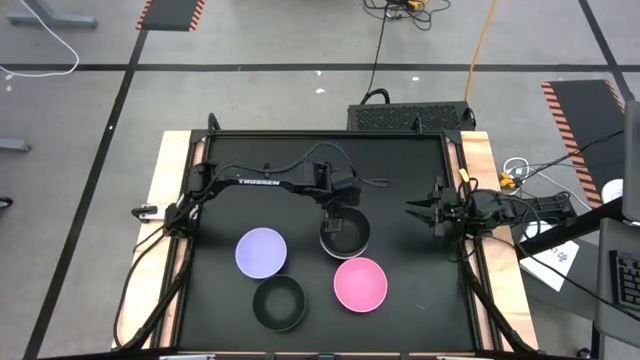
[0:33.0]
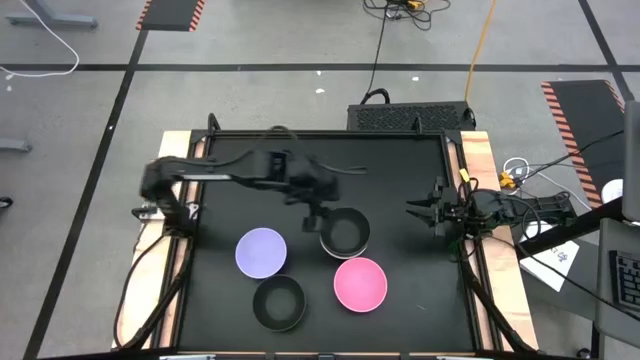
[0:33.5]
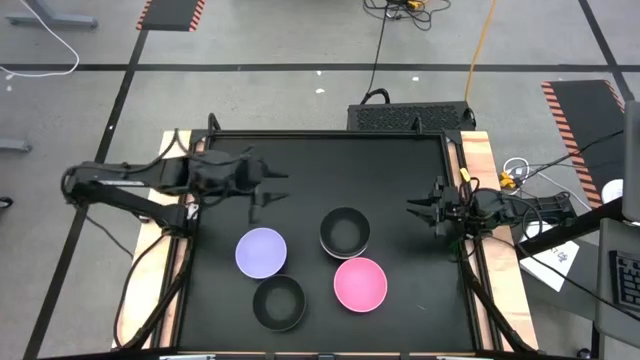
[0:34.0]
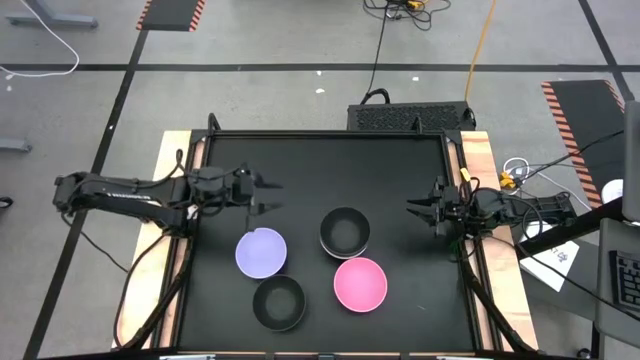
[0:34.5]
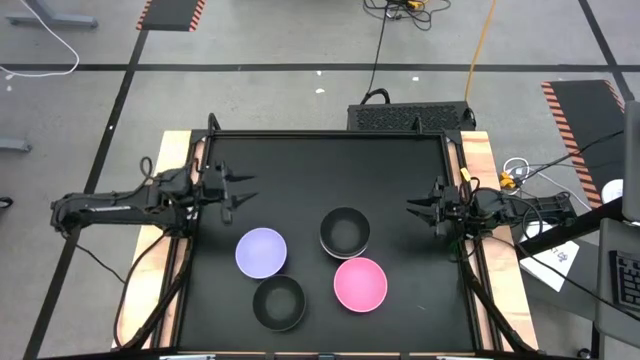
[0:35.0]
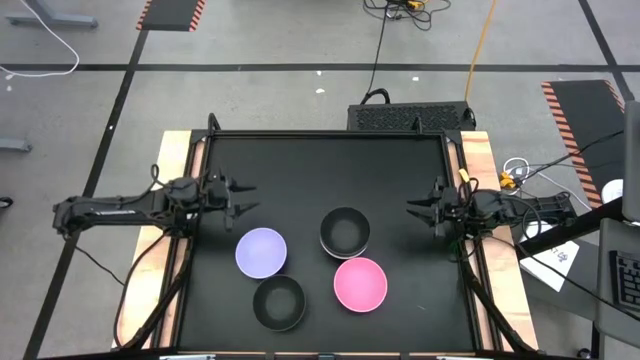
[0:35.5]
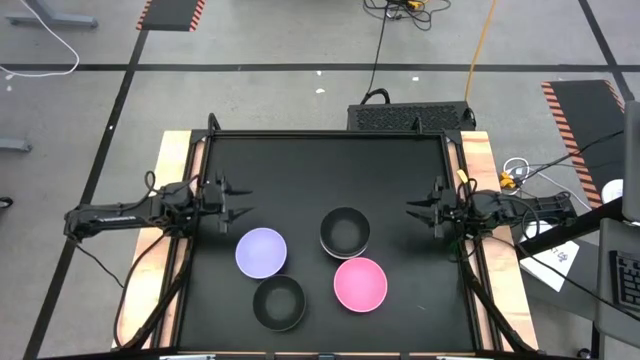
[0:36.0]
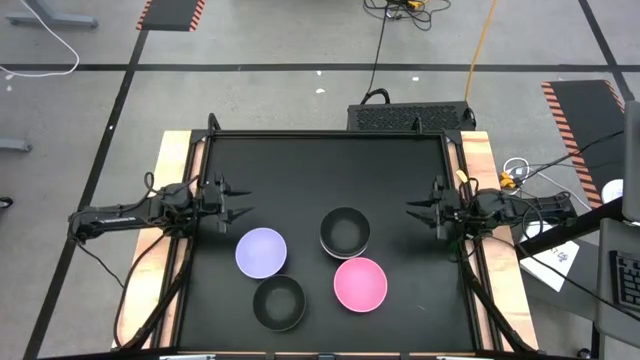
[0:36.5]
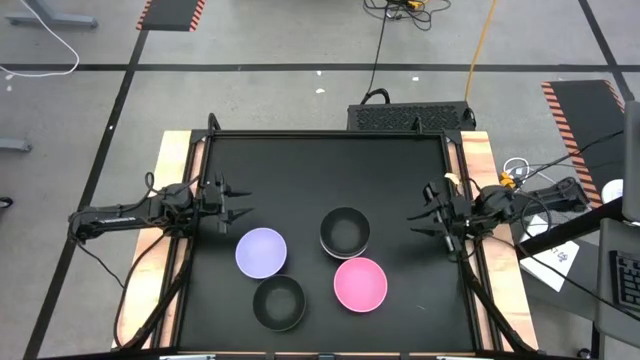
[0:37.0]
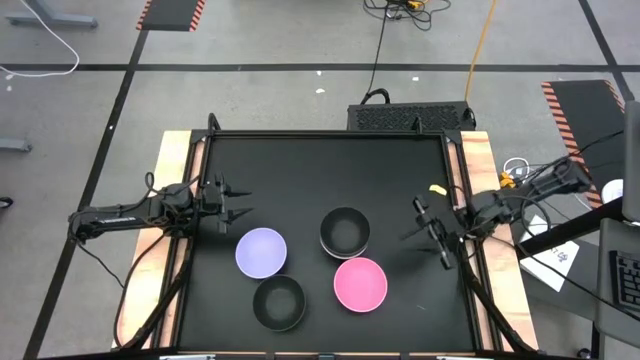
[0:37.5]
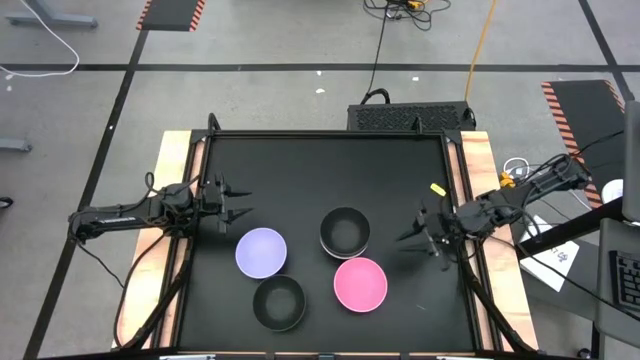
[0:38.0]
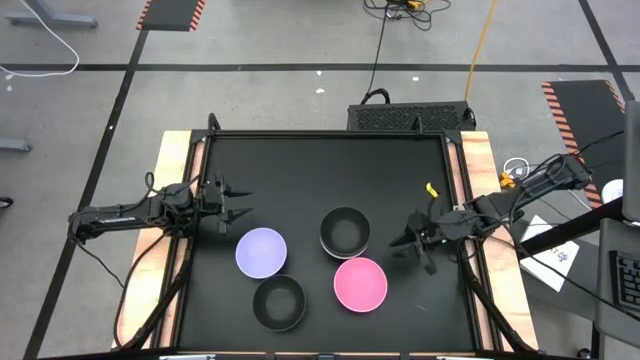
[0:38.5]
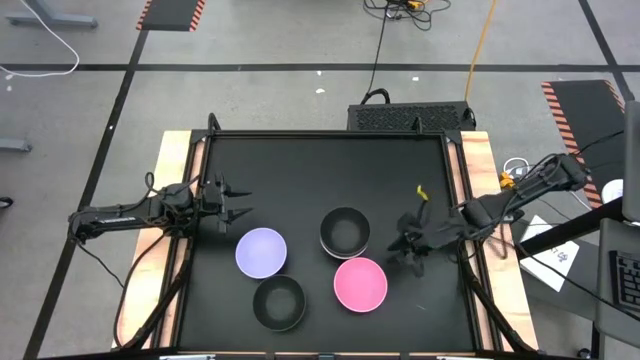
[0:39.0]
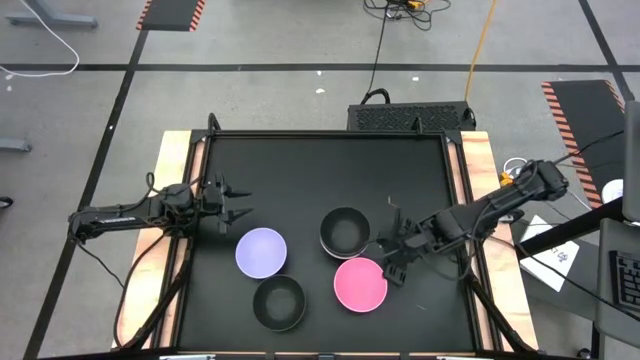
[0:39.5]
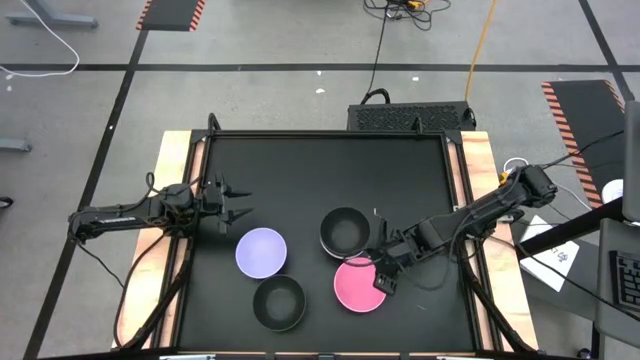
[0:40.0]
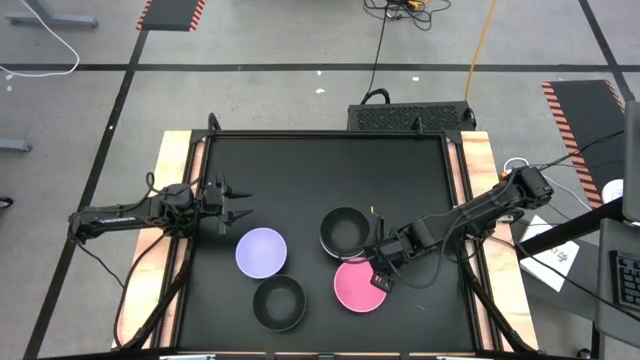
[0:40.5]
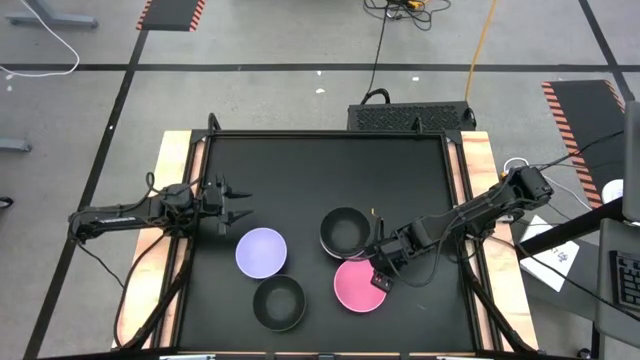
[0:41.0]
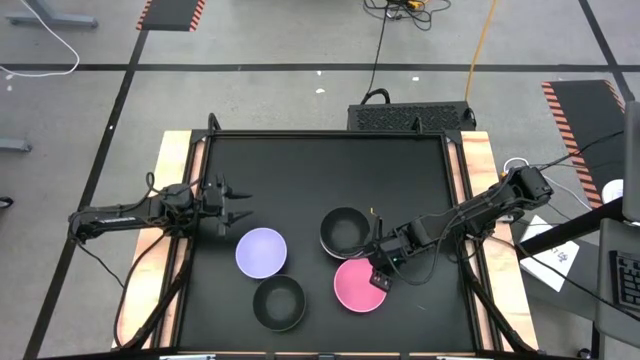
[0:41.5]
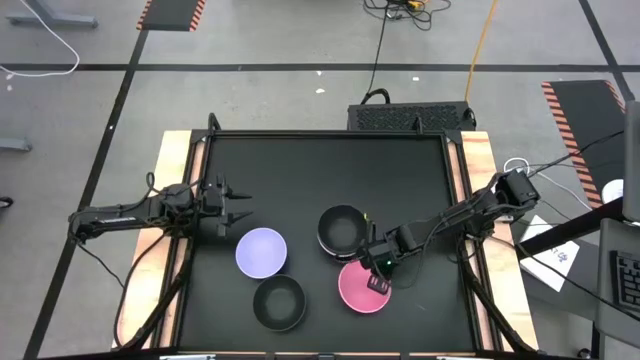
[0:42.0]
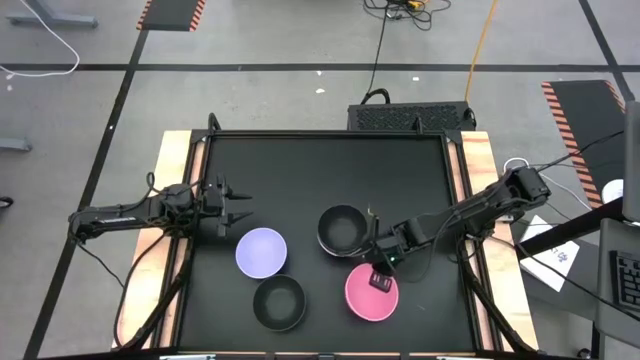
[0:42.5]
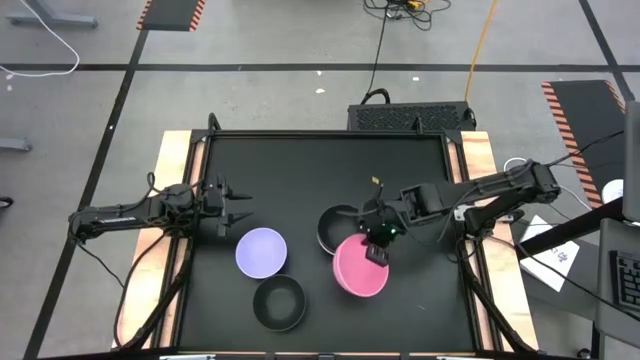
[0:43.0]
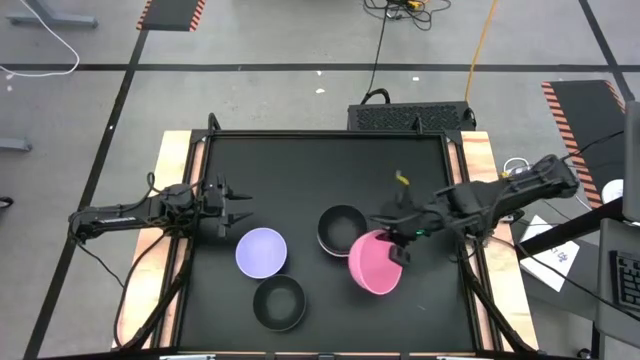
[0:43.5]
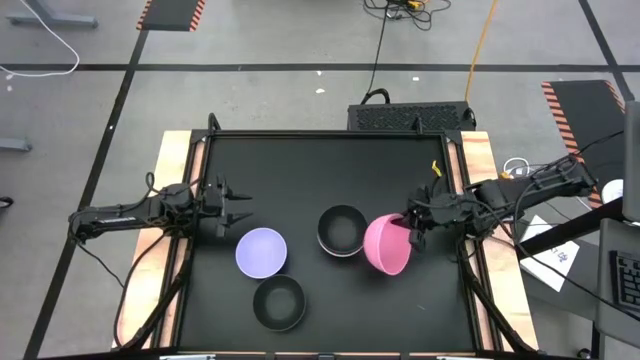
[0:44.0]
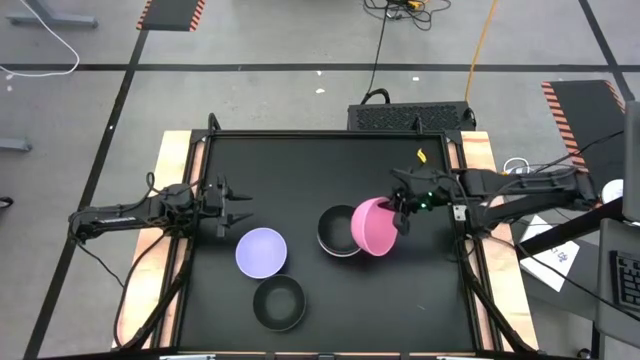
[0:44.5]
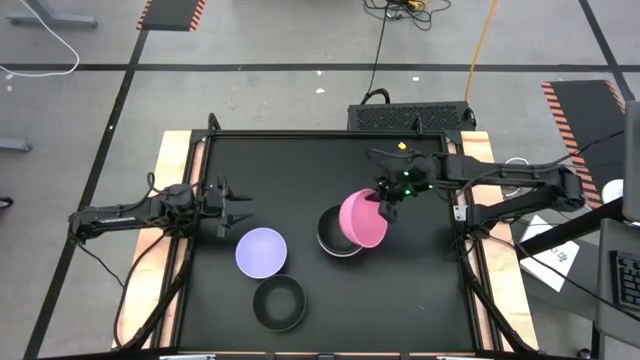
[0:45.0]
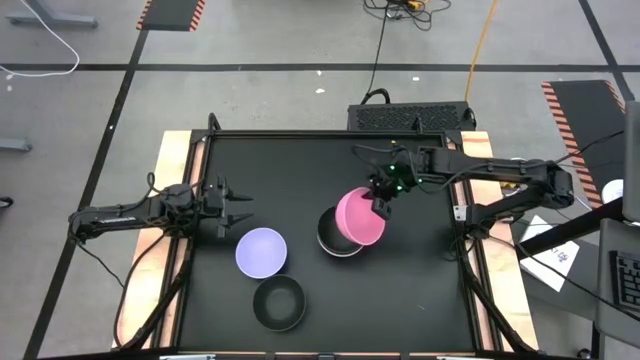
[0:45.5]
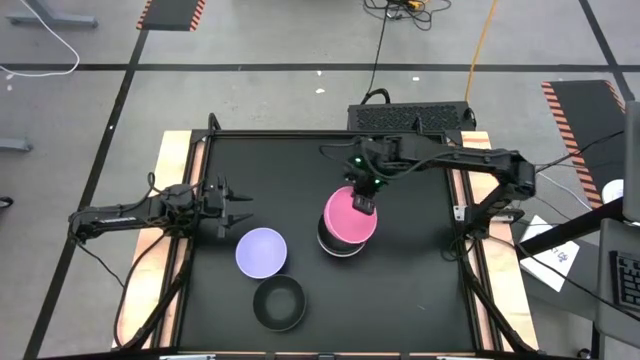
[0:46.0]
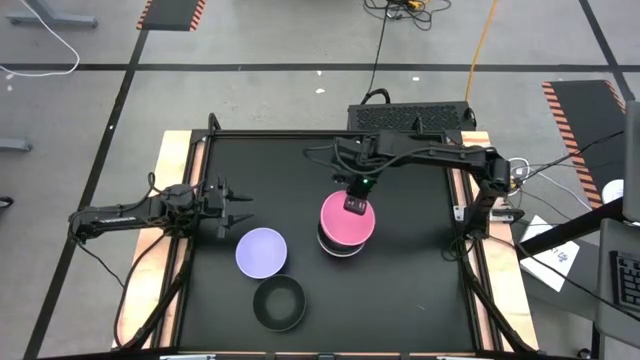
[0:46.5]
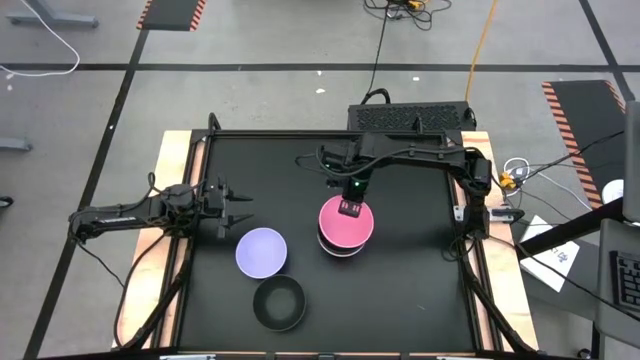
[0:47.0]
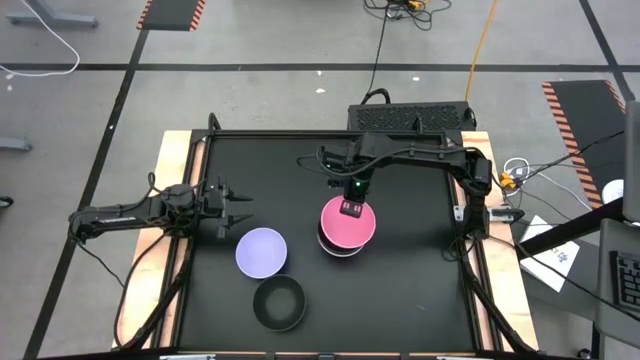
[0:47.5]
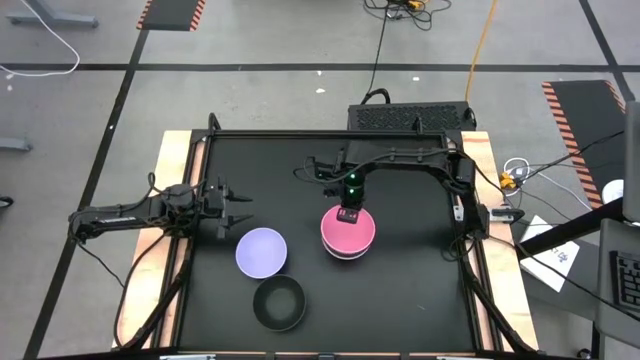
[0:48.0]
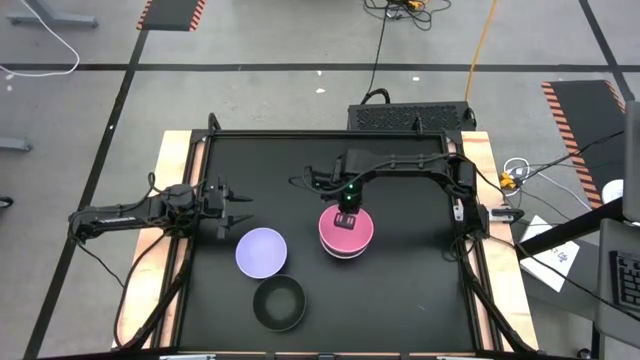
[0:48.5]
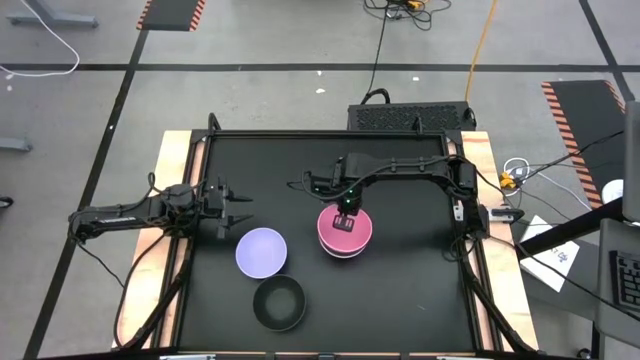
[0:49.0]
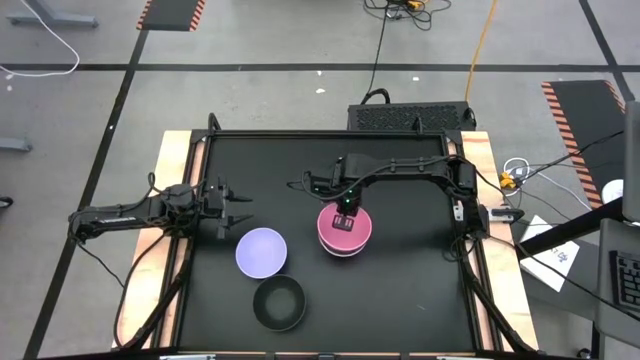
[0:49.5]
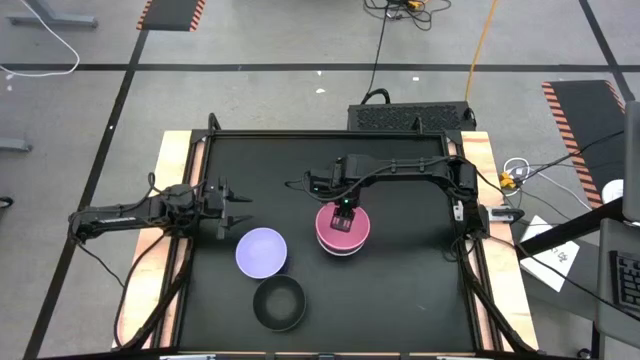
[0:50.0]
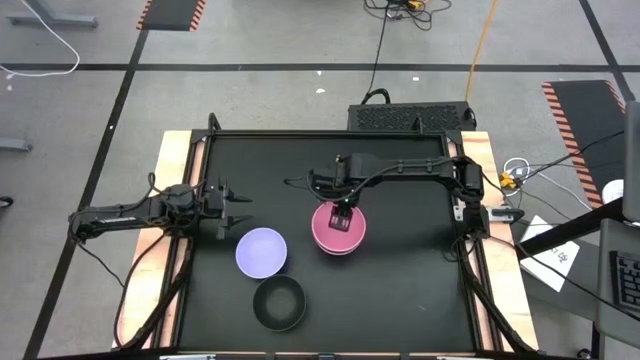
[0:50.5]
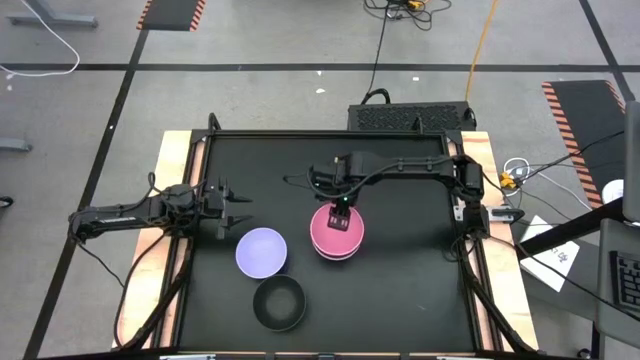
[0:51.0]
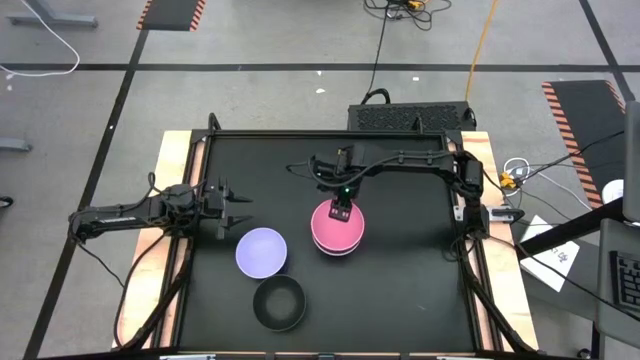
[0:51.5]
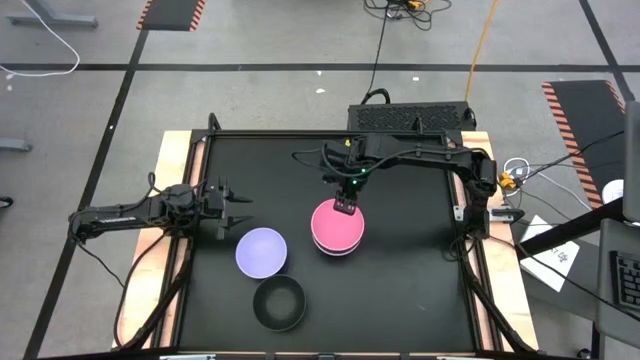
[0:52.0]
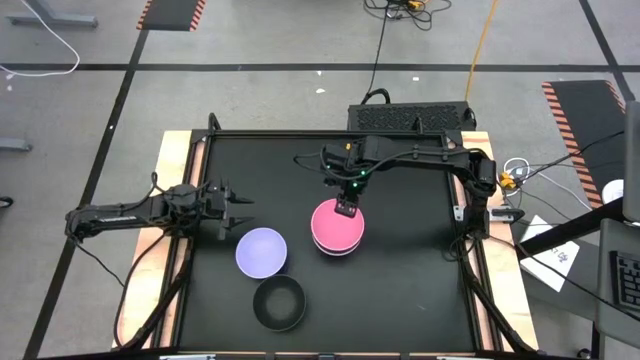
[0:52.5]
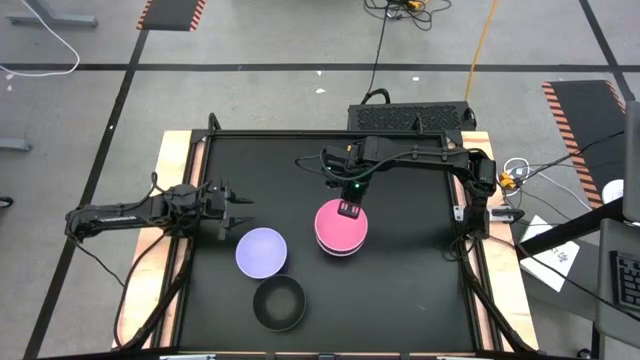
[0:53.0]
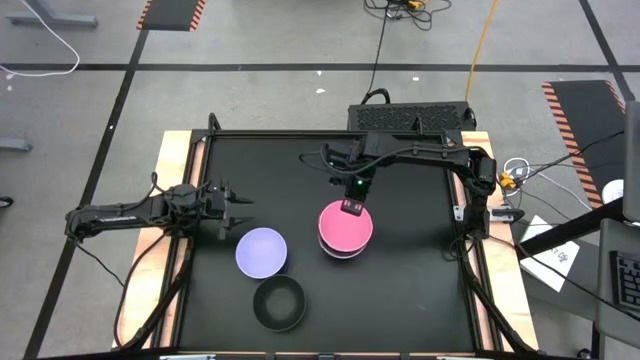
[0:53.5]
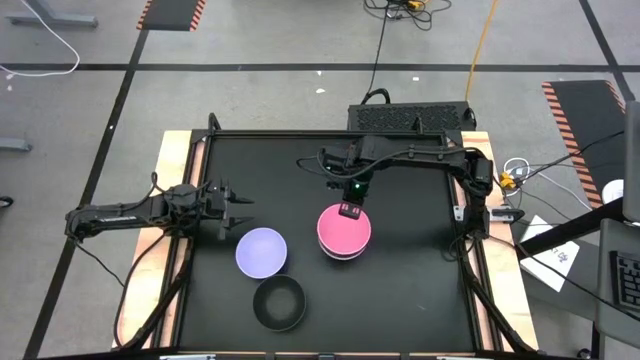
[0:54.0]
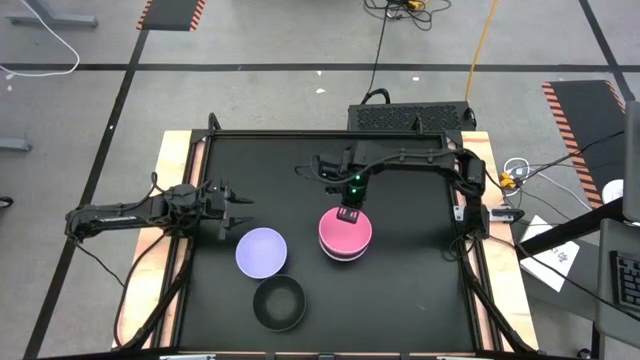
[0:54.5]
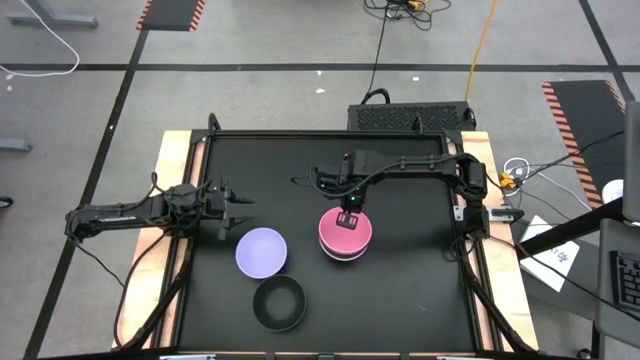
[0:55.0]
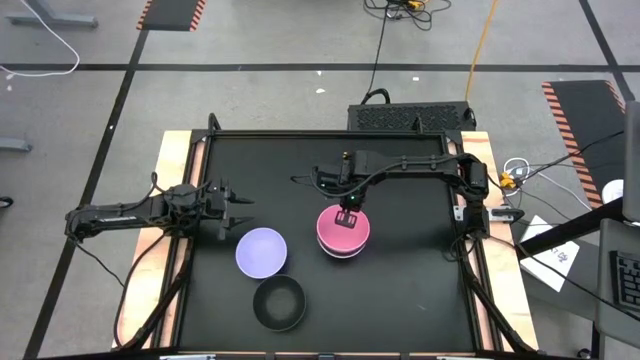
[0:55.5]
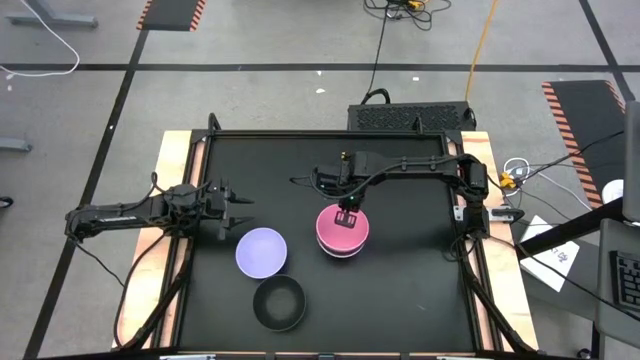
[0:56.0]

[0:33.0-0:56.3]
Task: Nest bowls inside each other
Stack the pink bowl into the black bowl
